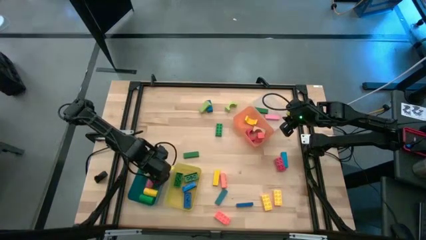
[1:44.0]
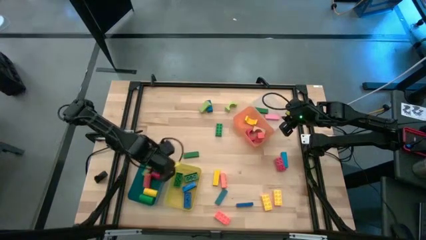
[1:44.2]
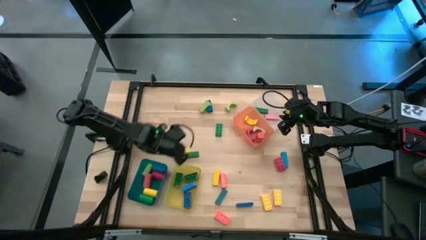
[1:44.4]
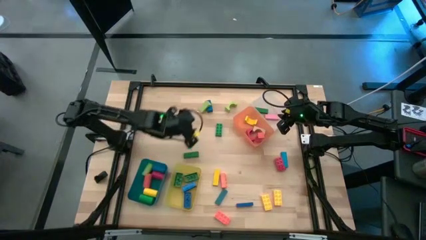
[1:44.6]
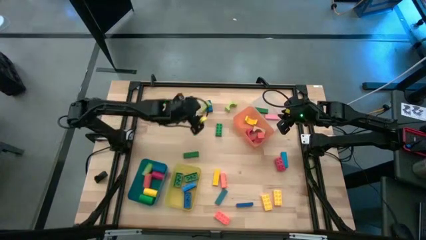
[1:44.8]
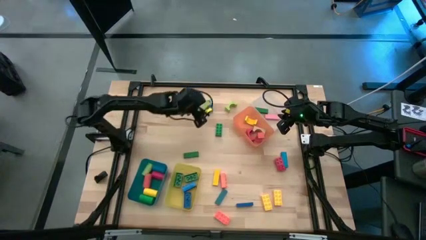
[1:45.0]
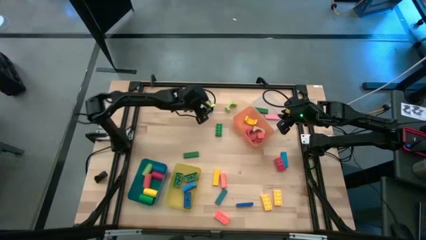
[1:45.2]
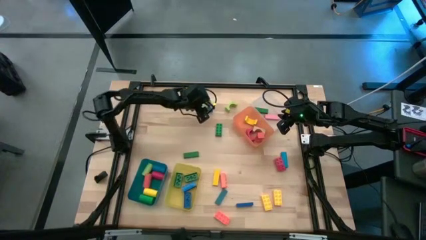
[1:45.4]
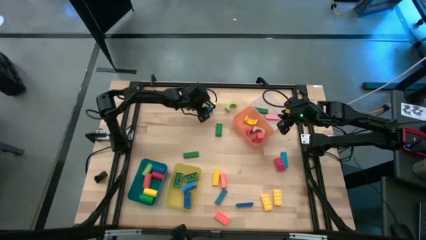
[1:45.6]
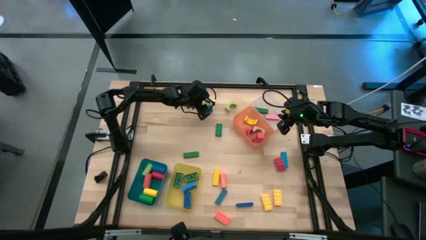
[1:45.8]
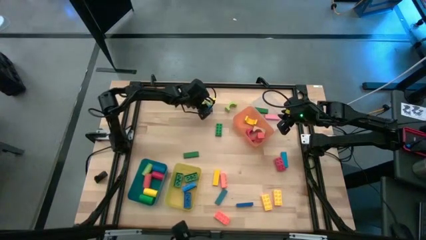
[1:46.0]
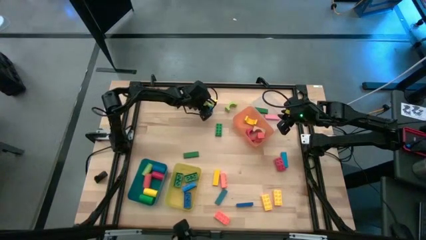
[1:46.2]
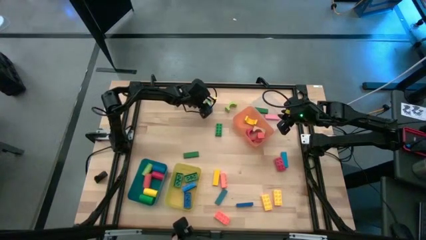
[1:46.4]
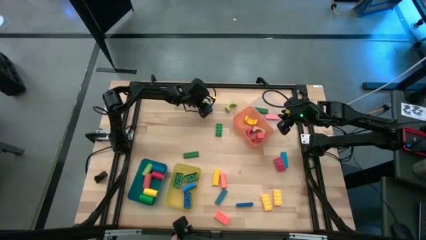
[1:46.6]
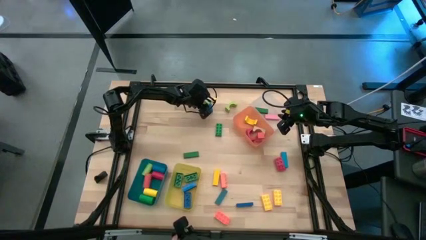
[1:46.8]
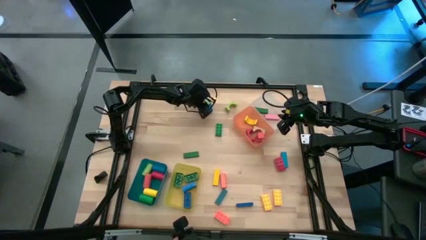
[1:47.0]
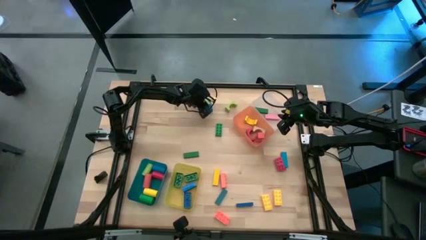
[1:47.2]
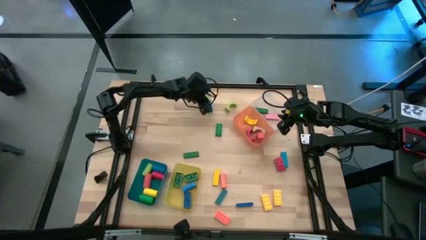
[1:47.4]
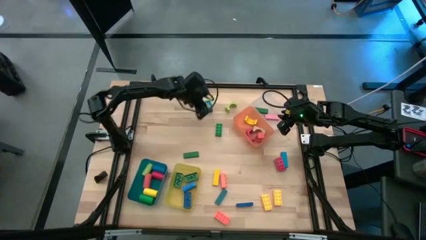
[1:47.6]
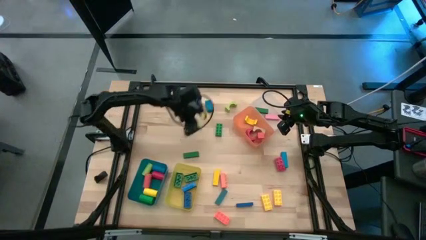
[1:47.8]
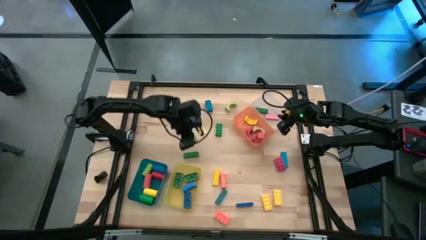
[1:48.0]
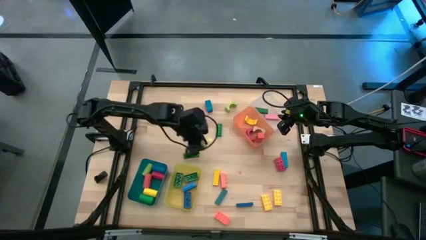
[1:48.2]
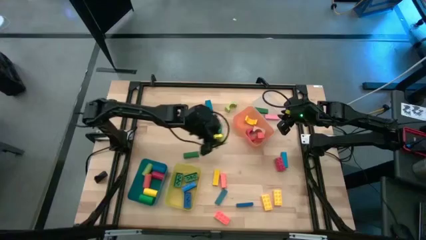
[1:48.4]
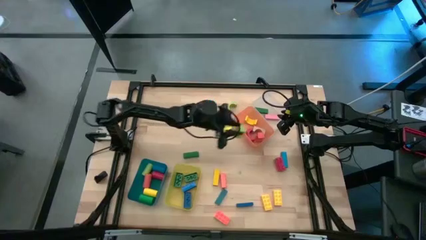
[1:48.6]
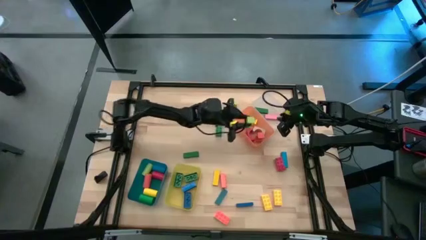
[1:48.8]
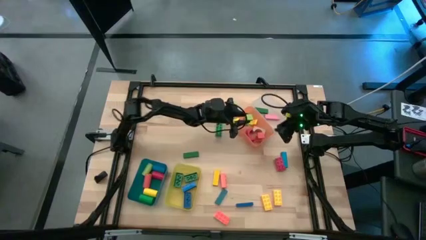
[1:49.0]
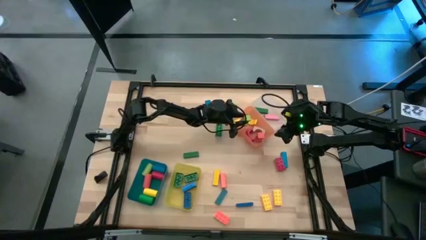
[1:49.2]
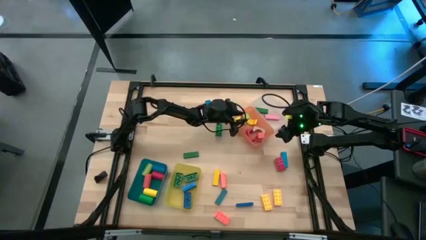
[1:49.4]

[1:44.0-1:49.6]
Task: Sort blocks by size
Put the light green arch block into the orange bin

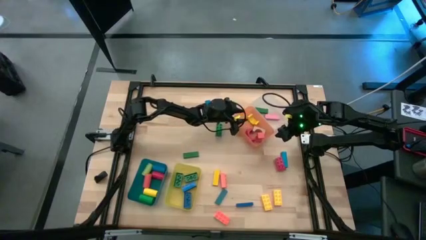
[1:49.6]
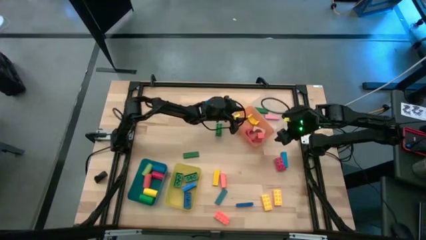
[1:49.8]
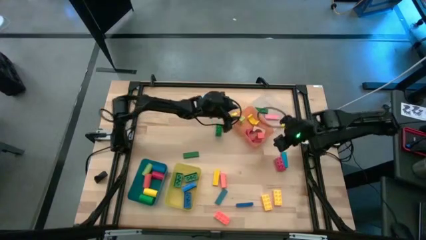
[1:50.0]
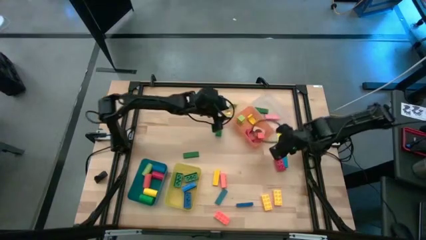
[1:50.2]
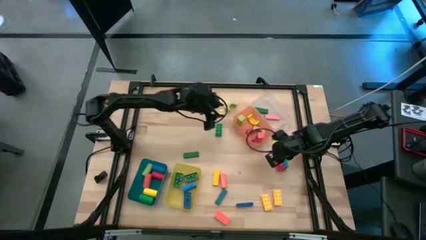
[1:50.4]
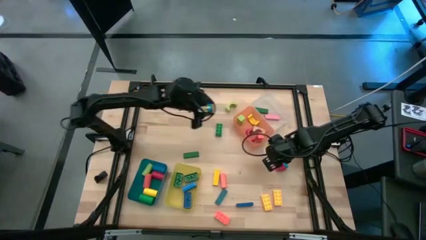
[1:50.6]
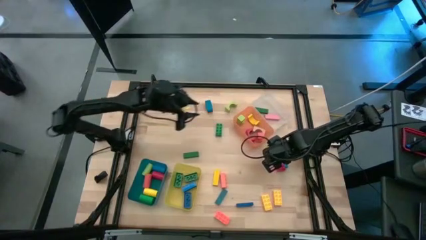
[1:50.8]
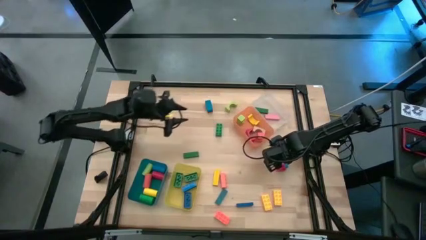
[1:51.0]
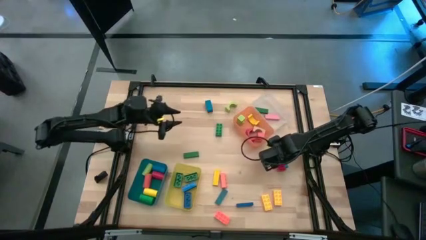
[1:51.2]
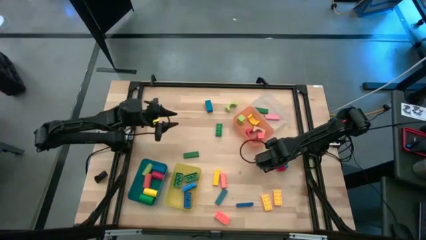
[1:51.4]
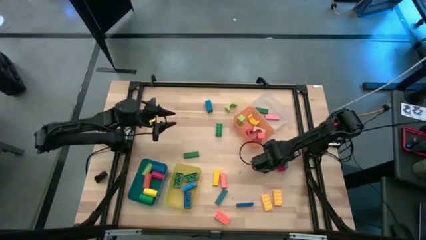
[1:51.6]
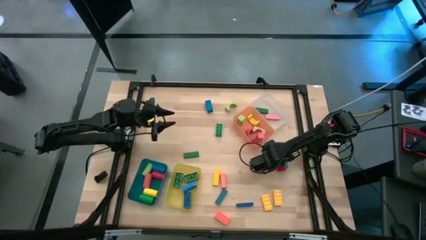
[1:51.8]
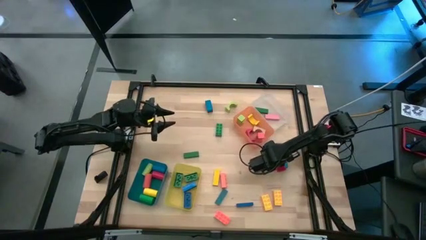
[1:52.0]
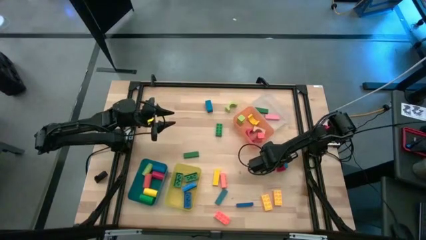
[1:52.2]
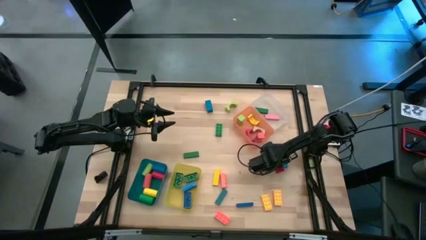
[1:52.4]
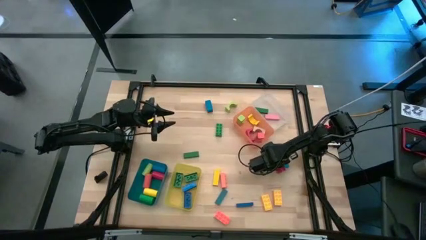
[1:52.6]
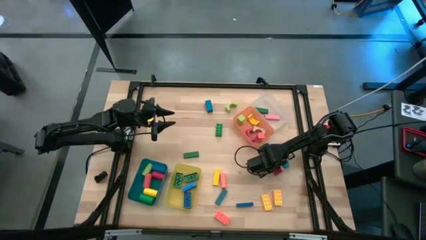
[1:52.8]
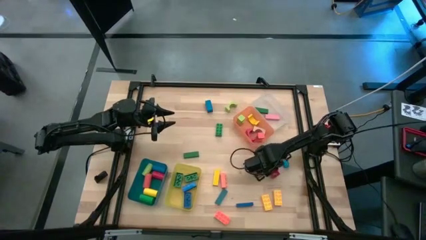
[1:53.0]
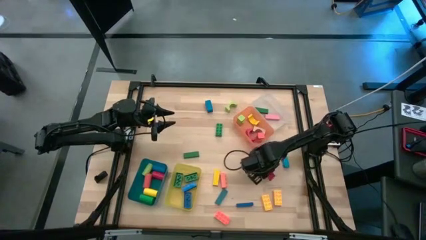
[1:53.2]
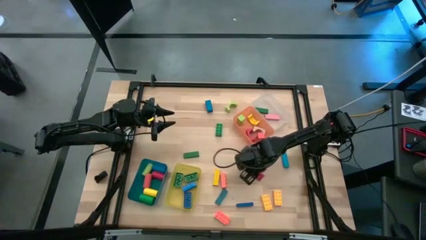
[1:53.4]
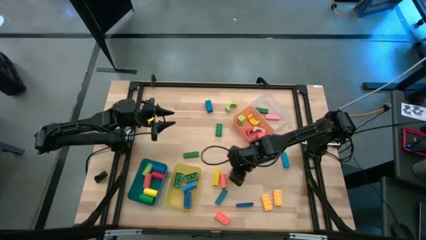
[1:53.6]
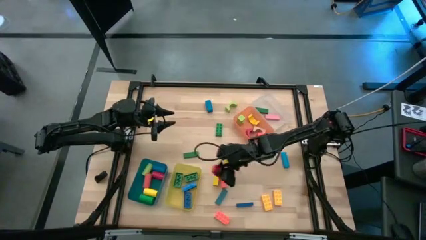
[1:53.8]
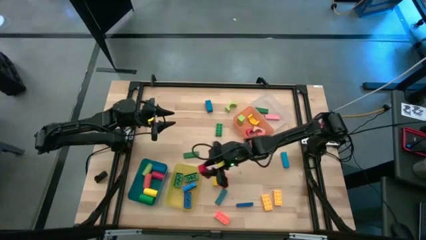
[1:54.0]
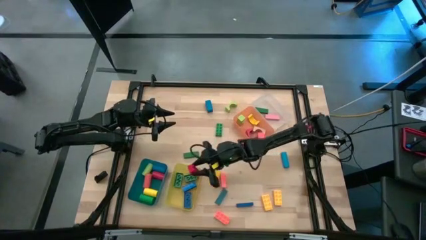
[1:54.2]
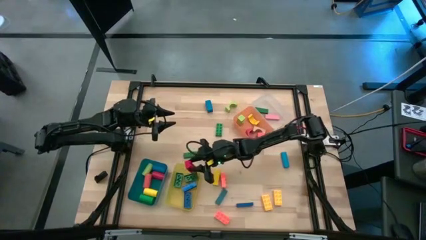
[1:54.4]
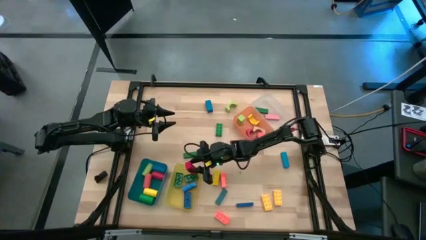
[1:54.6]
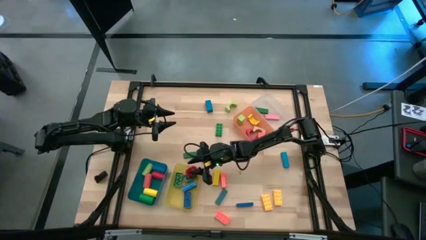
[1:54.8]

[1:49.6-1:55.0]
Put the red rectangle game piece into the yellow bin

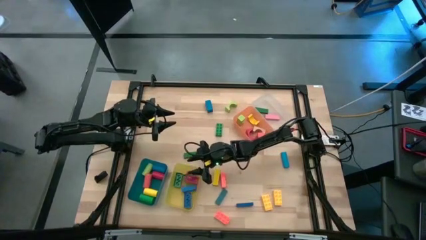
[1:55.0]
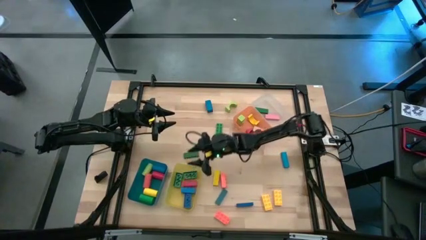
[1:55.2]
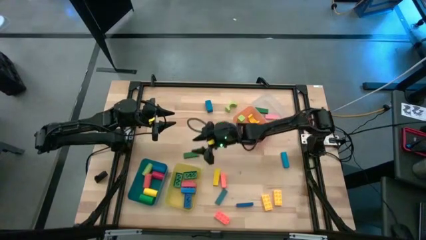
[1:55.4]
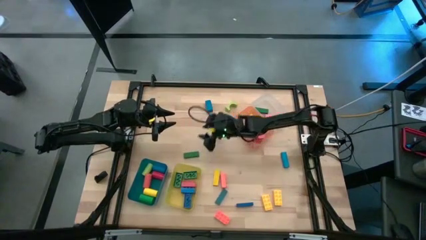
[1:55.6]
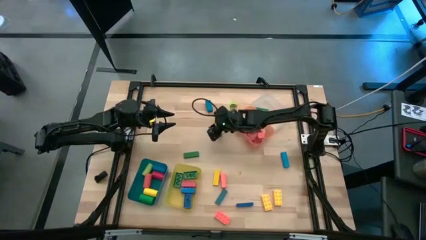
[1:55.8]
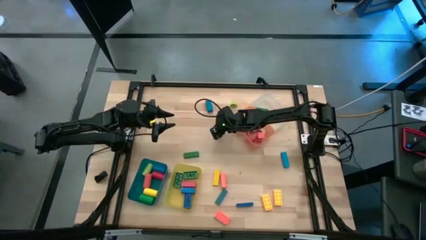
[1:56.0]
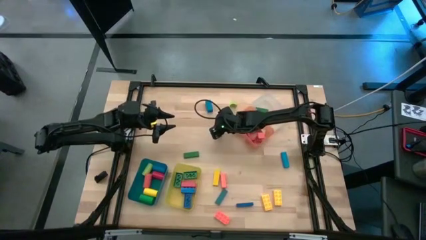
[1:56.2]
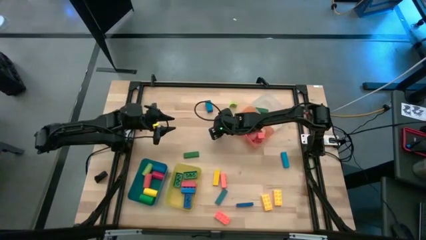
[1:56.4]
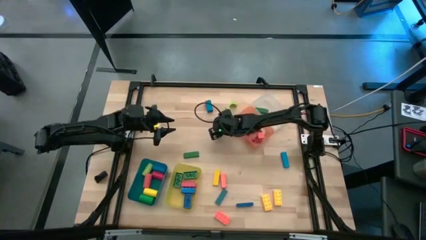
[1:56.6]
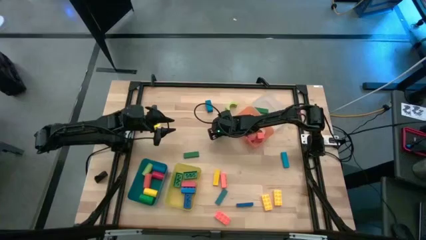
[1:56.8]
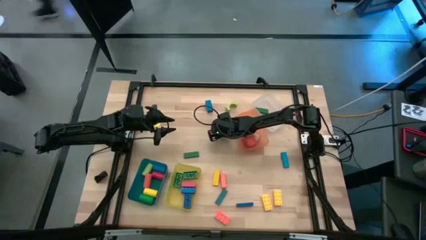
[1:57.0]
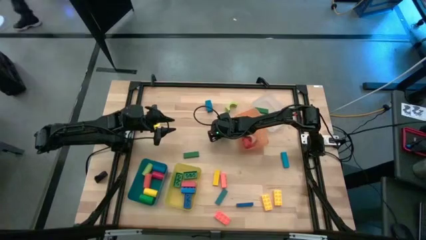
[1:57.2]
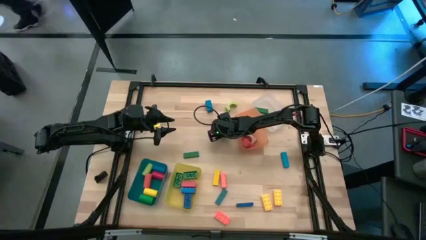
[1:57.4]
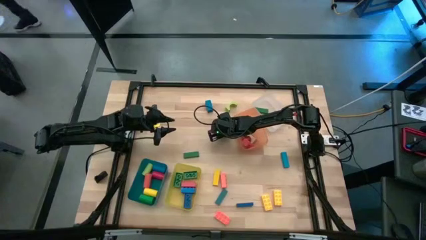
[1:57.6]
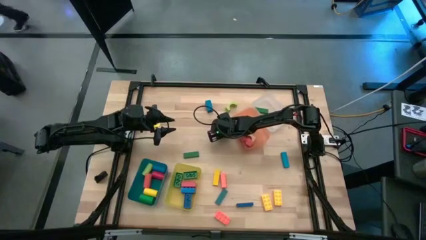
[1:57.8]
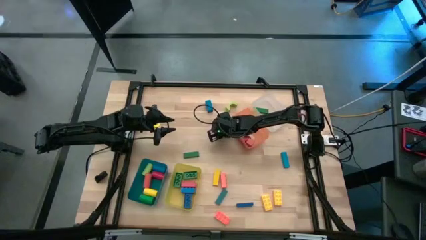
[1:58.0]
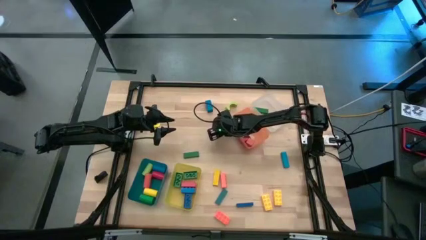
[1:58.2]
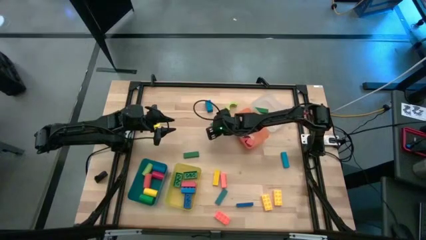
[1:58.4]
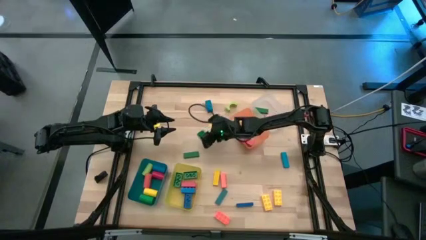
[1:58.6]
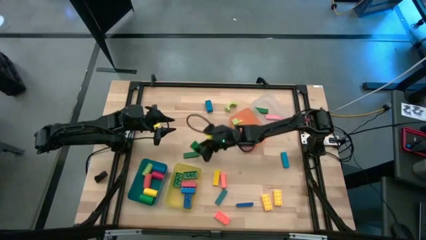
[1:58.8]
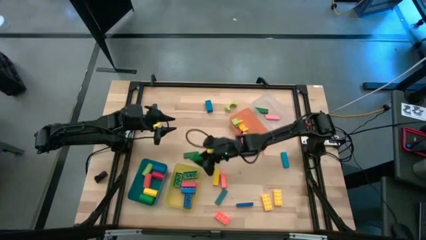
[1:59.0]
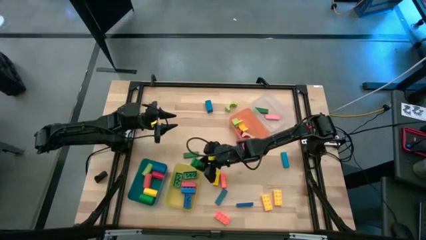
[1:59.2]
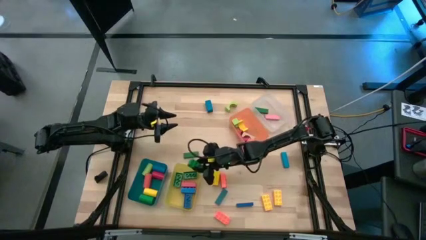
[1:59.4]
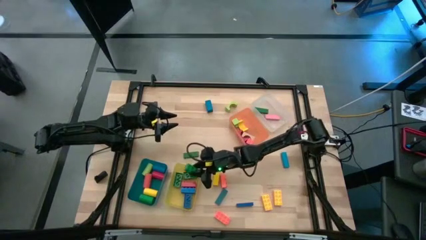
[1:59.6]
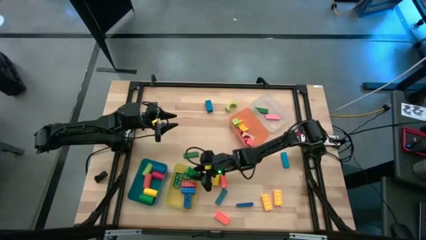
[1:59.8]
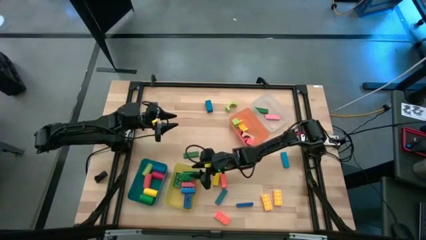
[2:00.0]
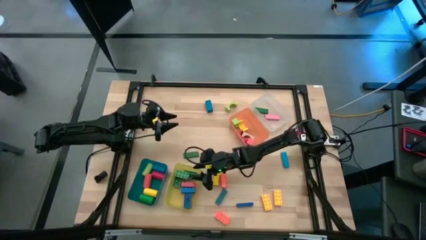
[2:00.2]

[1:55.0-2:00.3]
Put the green rectangle game piece into the yellow bin

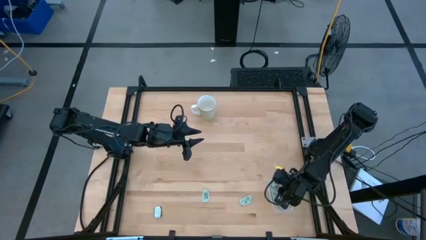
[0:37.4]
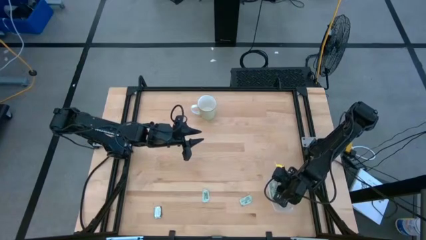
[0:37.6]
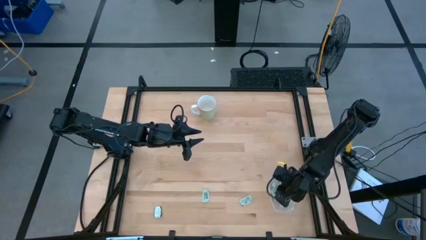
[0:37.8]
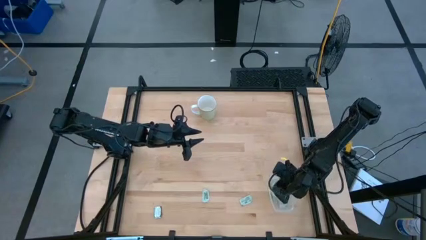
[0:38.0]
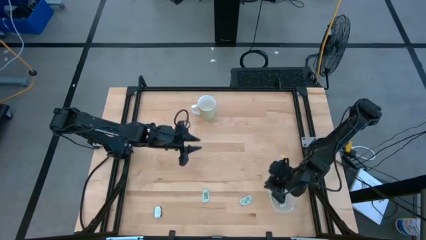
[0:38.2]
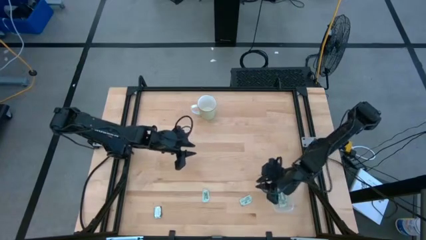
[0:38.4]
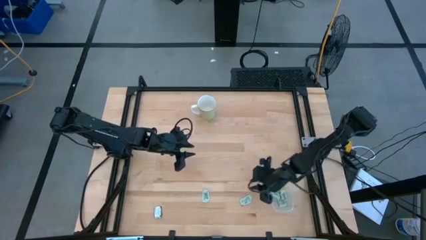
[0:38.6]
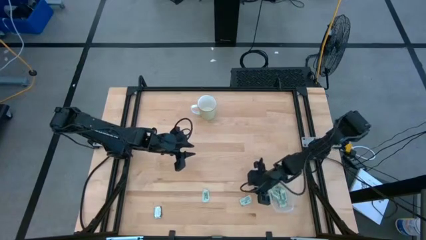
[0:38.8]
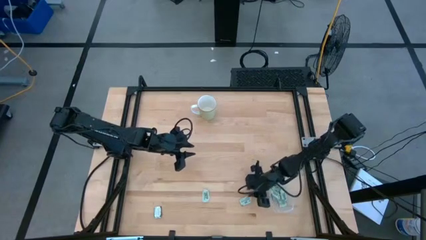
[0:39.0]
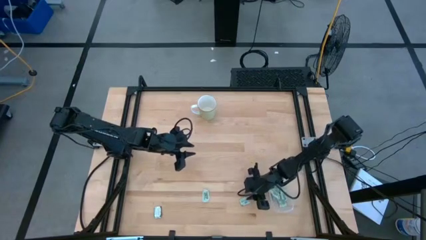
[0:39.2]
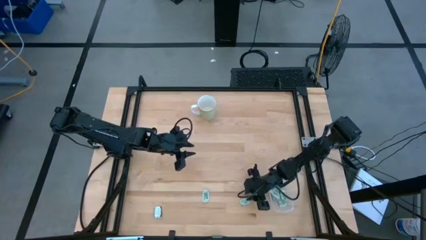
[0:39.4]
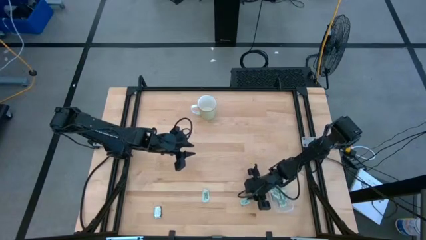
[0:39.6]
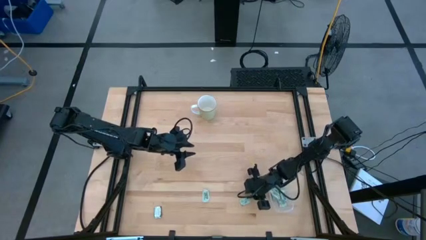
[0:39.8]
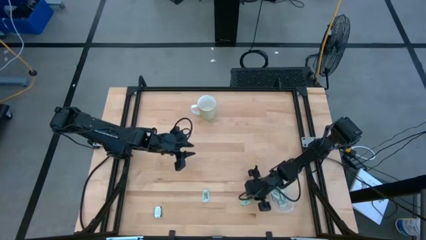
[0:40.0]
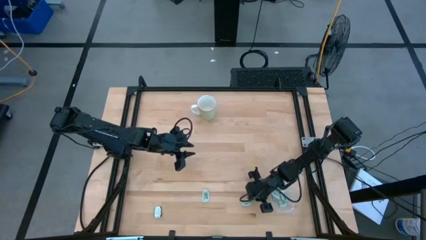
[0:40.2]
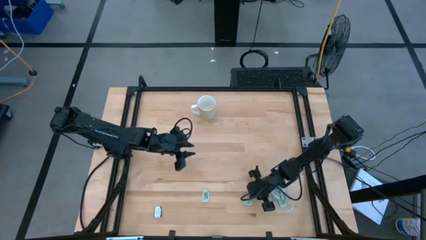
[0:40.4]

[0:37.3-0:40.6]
Task: Pick and place Stevia / Truvia into bins
Put the stevia packet into the transparent bin
